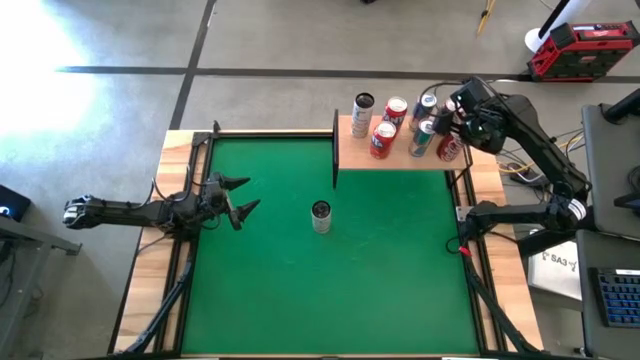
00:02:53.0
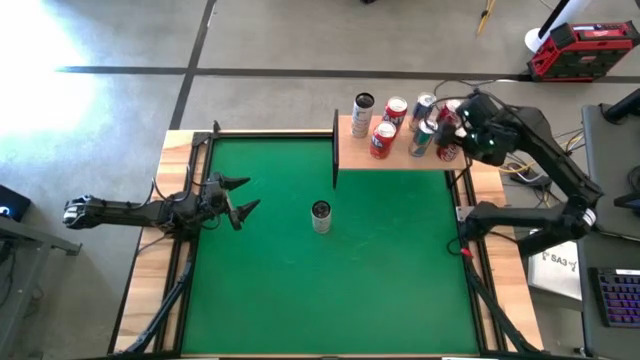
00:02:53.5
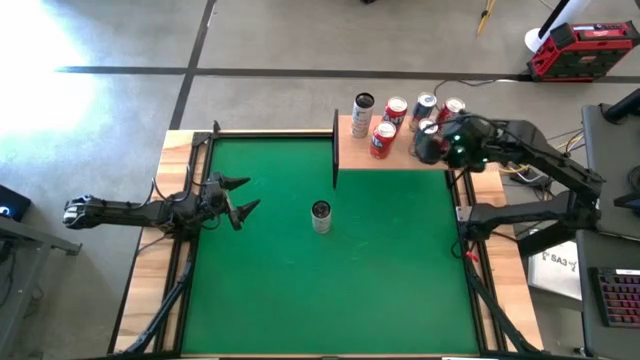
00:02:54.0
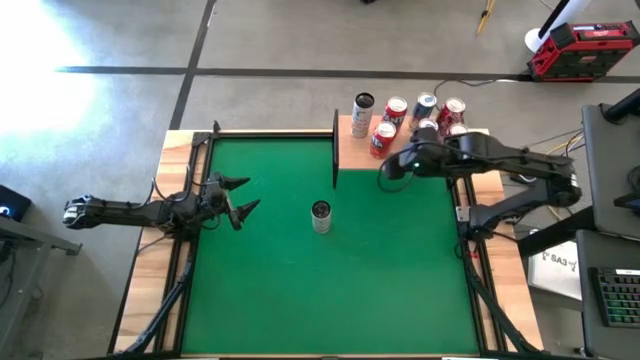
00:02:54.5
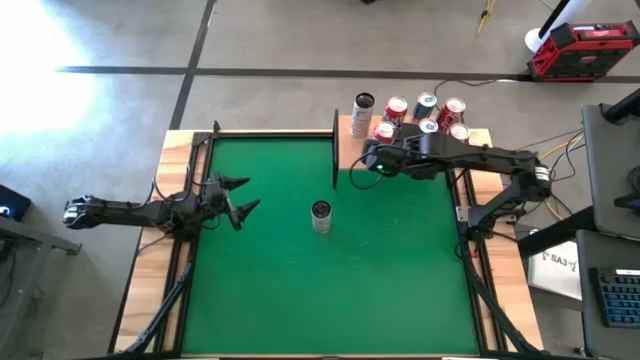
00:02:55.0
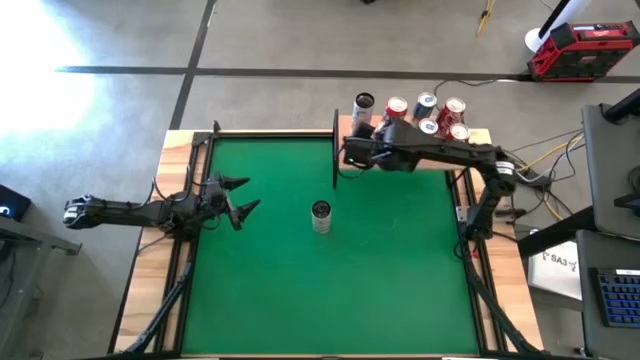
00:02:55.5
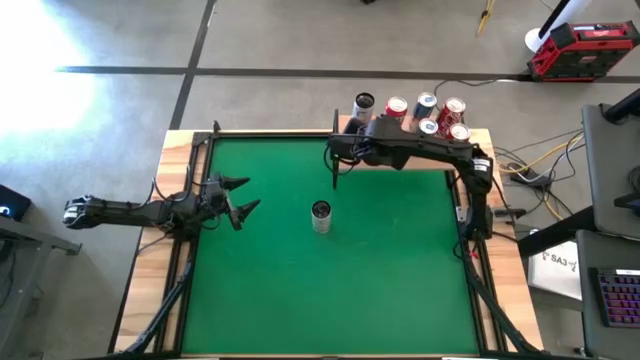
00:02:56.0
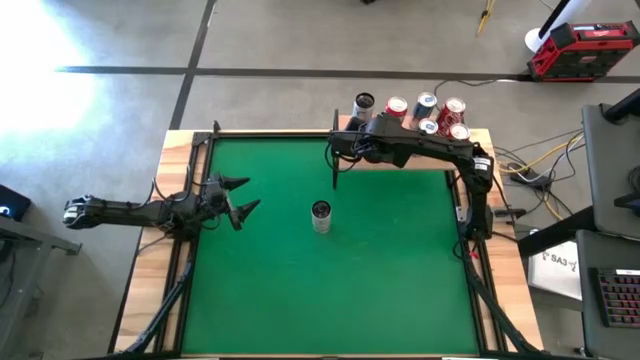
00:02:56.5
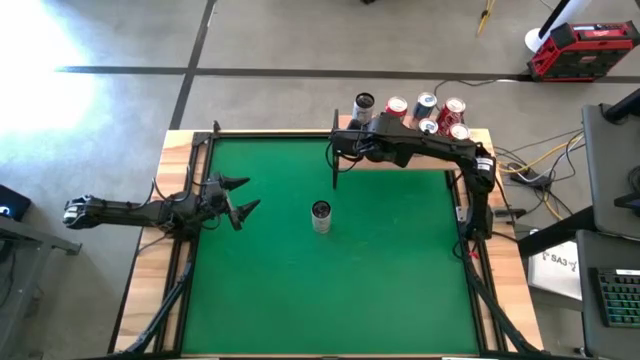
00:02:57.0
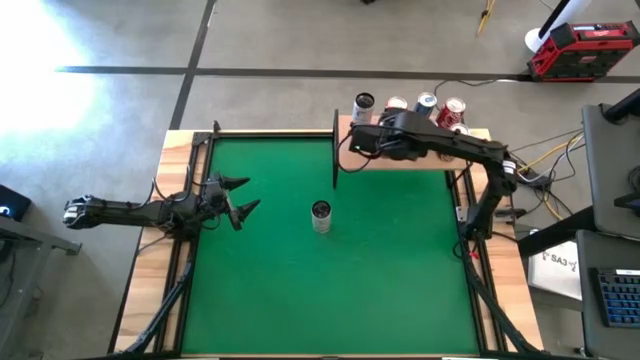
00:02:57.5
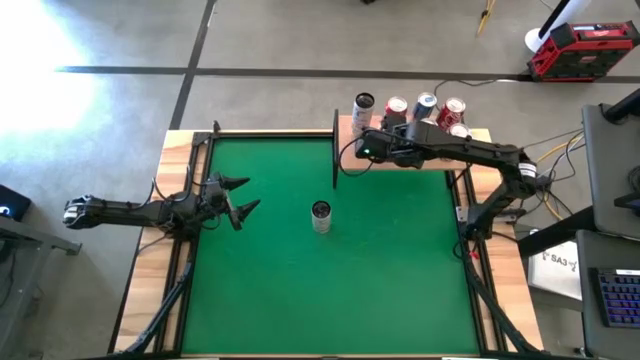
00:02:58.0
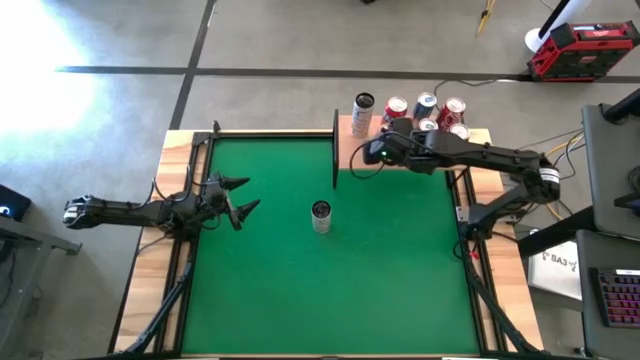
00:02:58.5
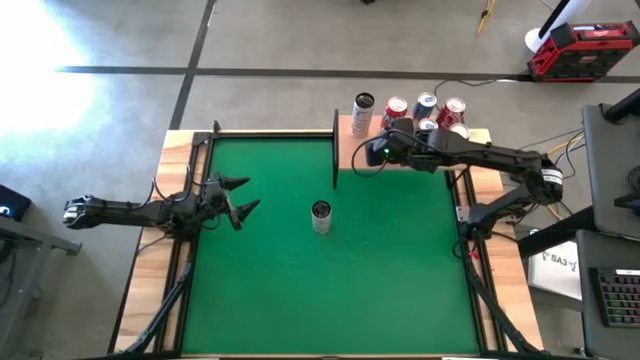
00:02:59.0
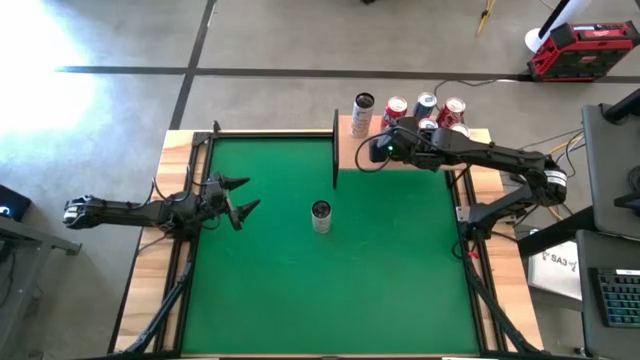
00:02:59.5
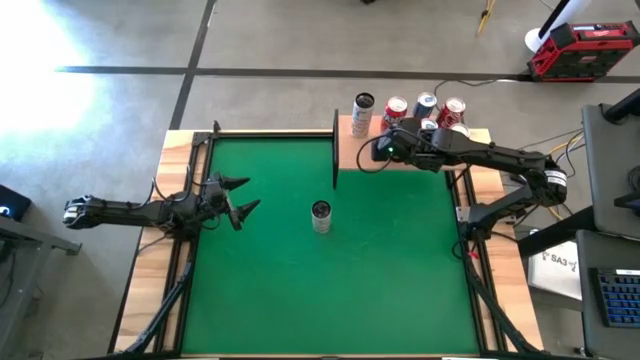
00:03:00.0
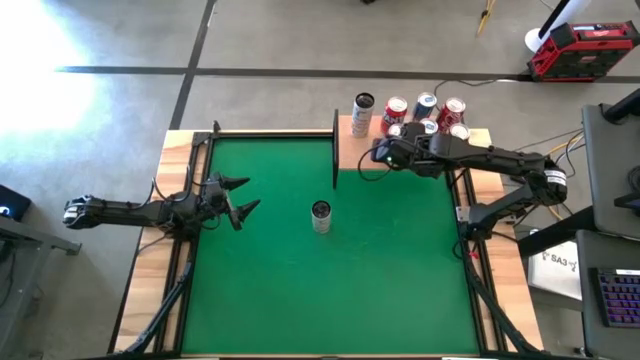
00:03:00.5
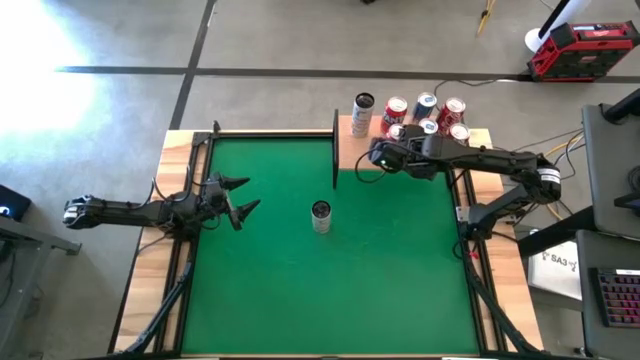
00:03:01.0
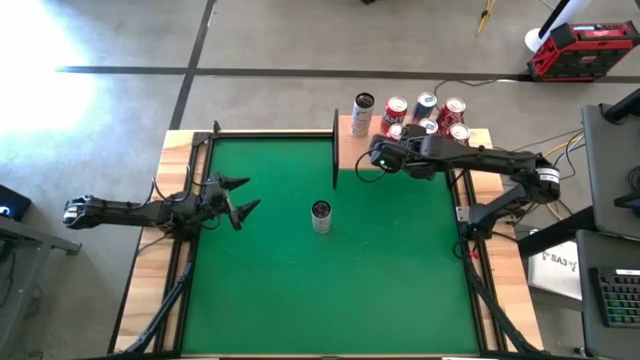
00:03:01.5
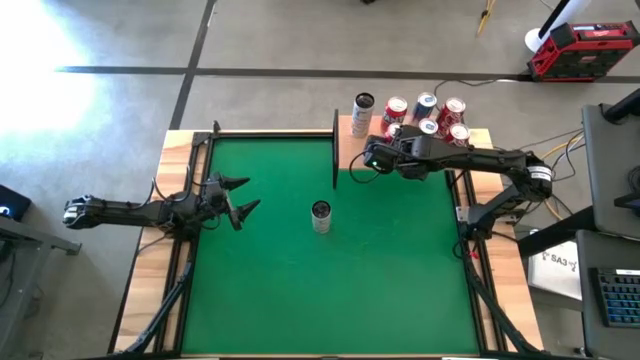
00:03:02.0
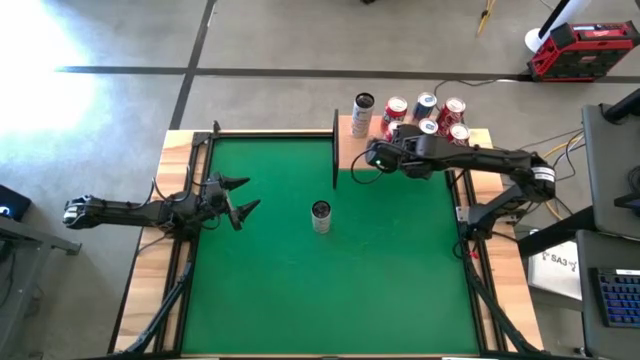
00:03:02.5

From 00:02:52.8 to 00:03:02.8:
Task: Place canned beverage on shelf
Adjust the red soda can on the shelf

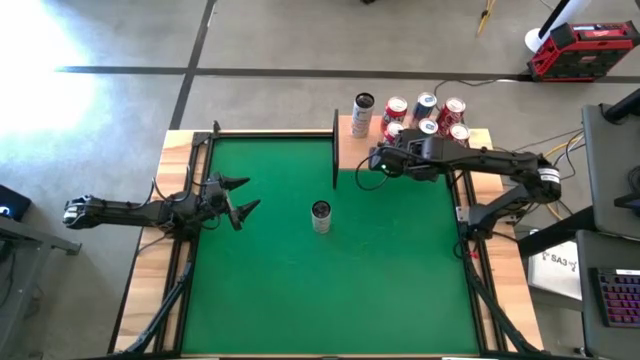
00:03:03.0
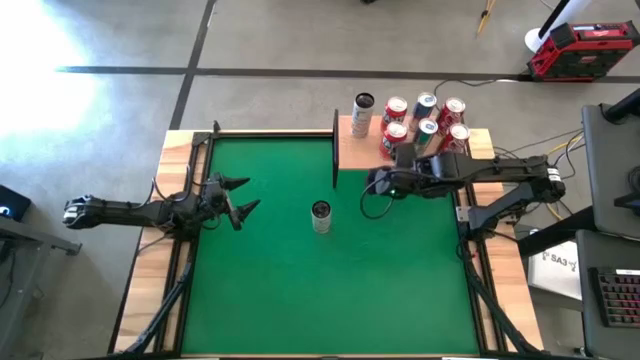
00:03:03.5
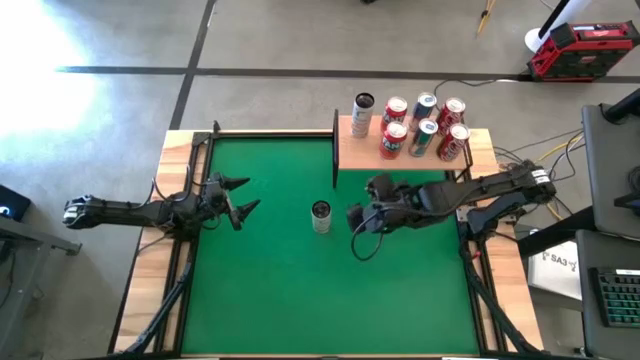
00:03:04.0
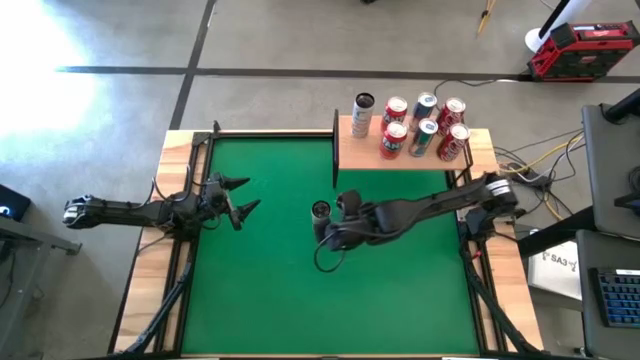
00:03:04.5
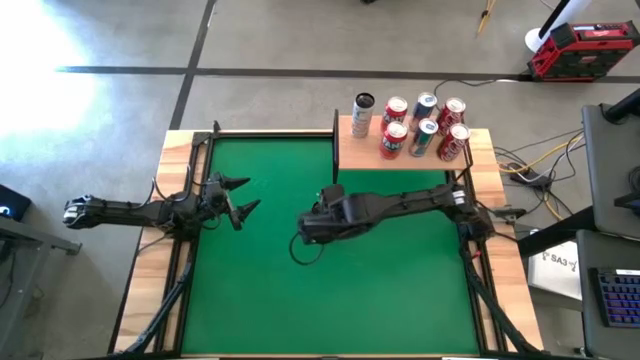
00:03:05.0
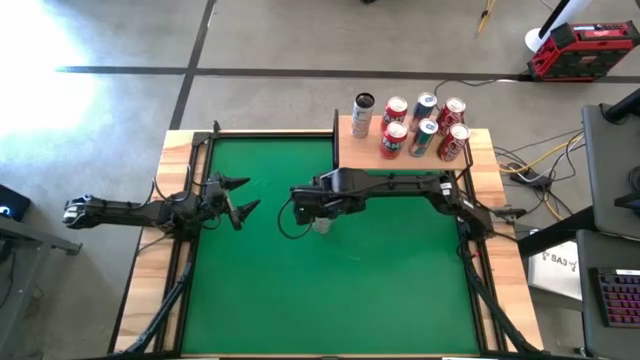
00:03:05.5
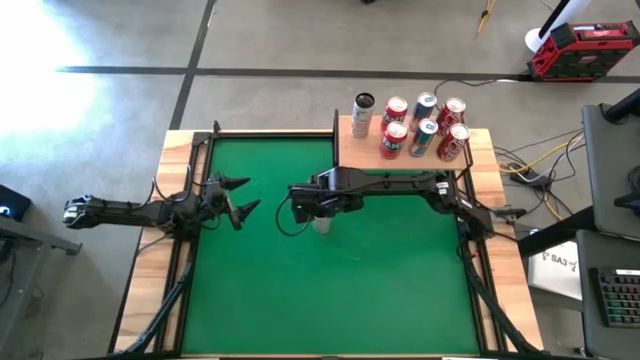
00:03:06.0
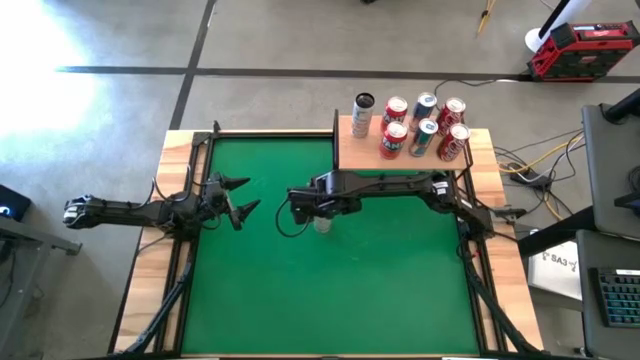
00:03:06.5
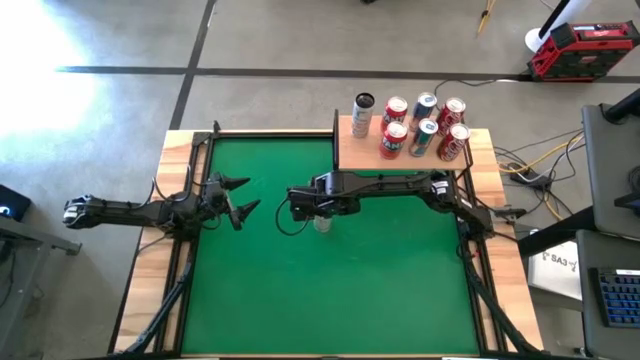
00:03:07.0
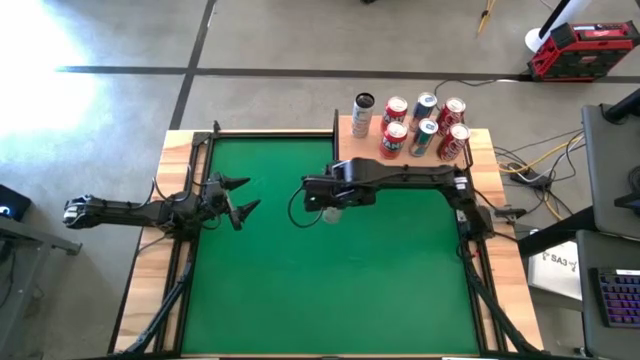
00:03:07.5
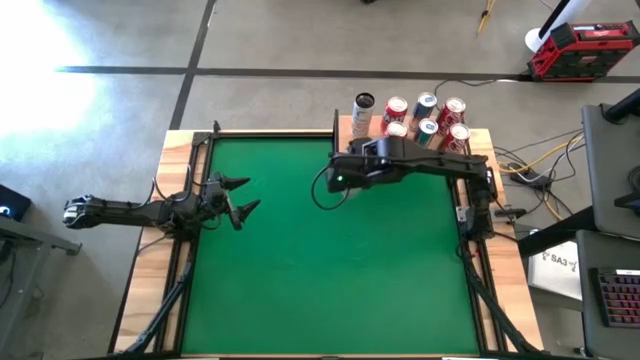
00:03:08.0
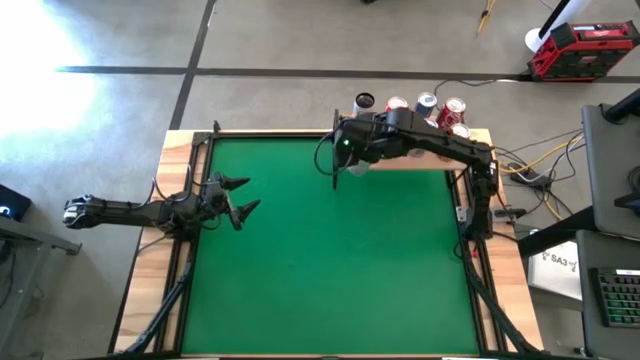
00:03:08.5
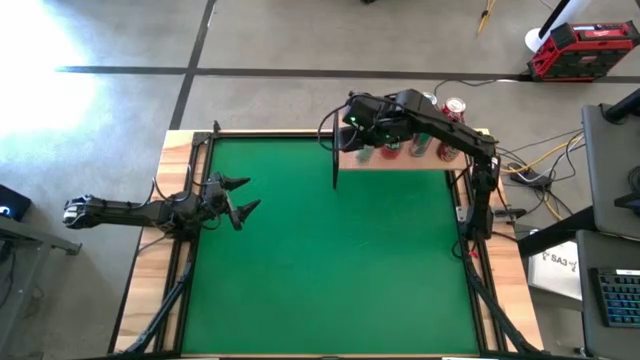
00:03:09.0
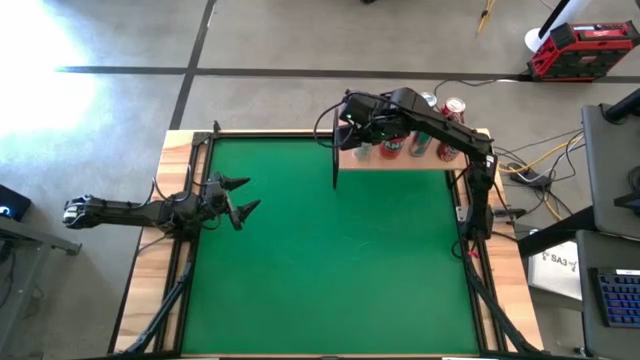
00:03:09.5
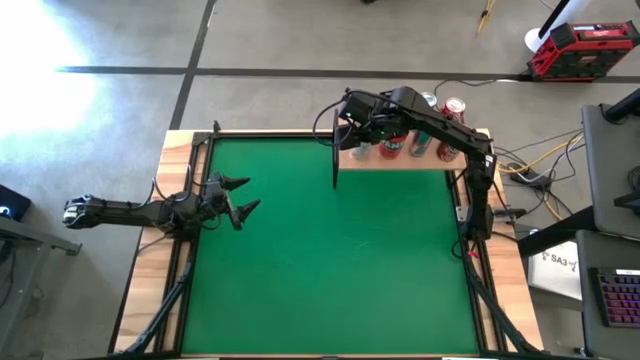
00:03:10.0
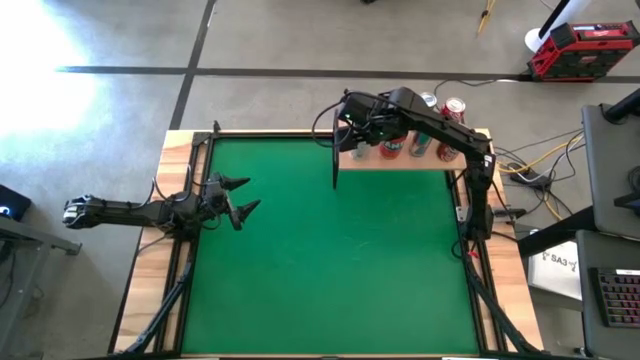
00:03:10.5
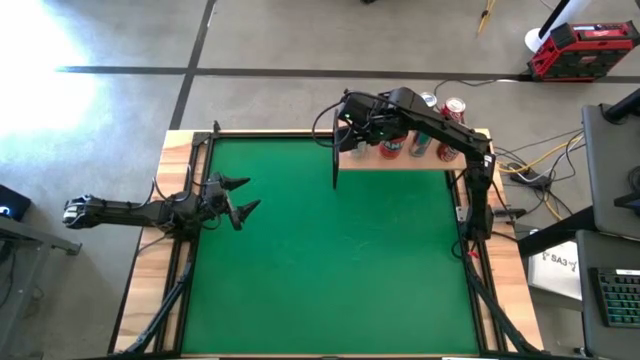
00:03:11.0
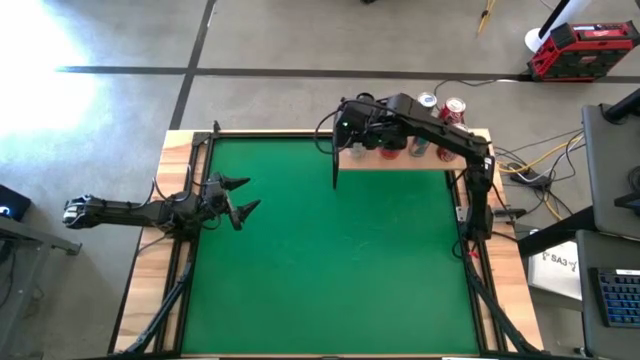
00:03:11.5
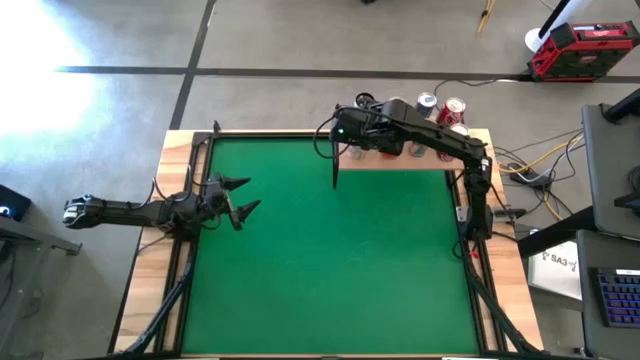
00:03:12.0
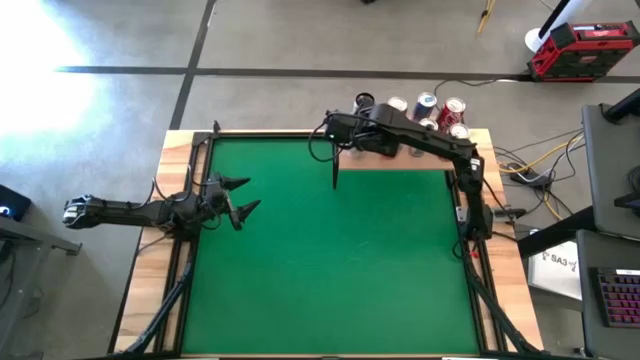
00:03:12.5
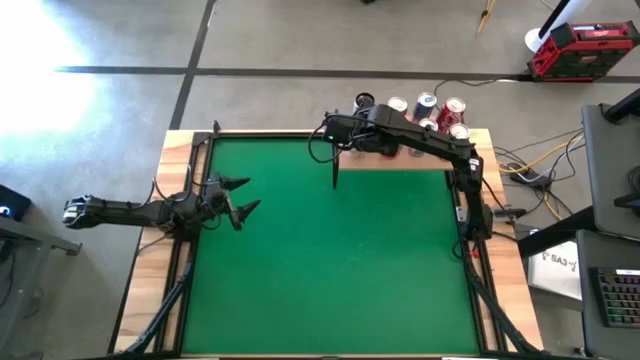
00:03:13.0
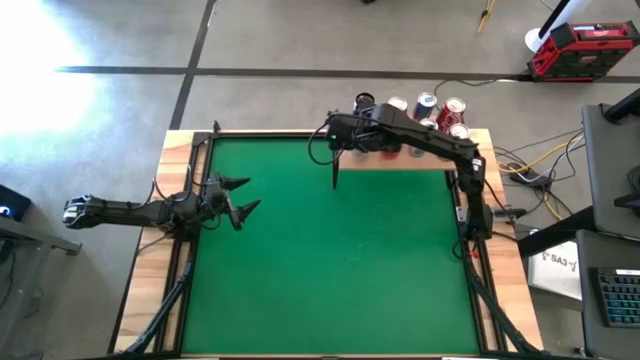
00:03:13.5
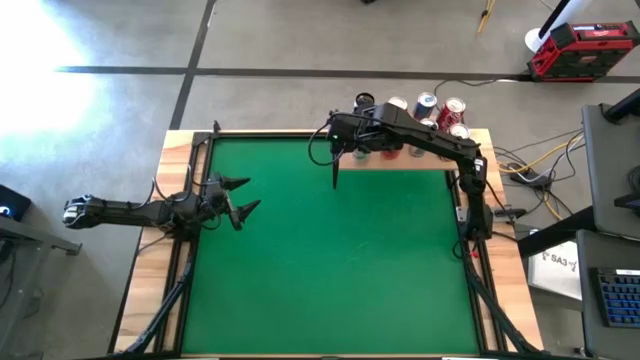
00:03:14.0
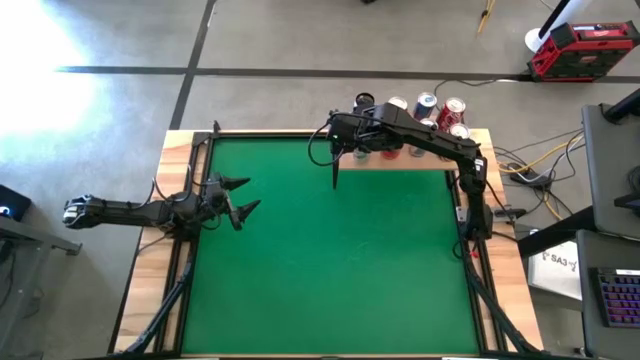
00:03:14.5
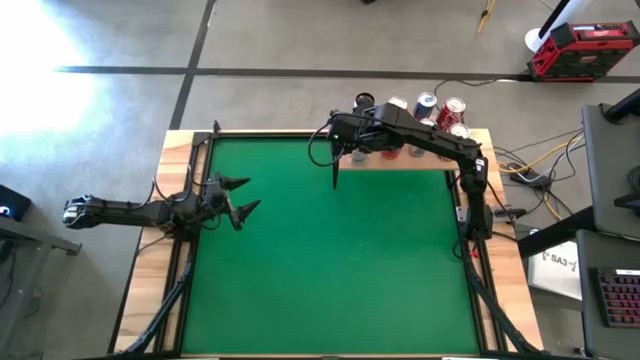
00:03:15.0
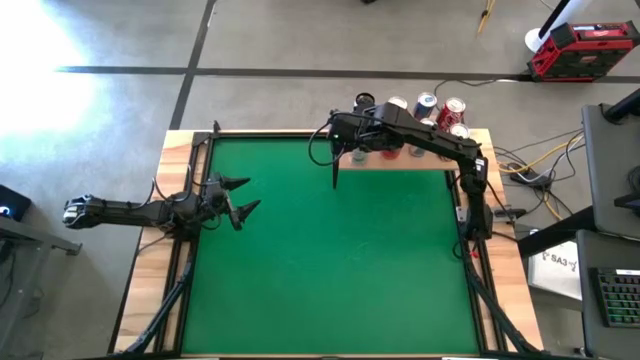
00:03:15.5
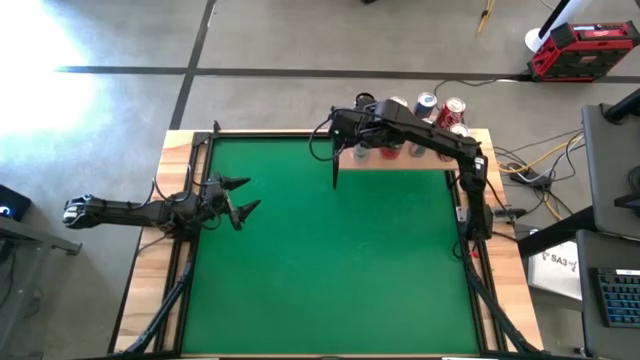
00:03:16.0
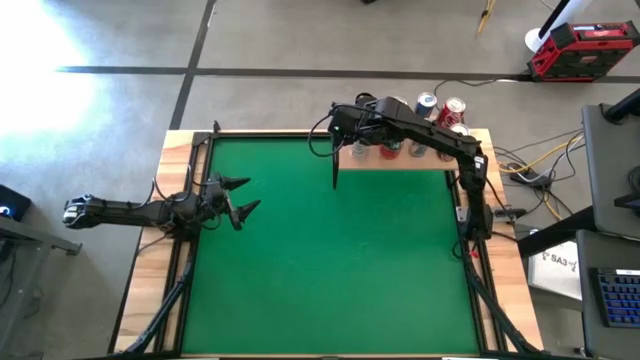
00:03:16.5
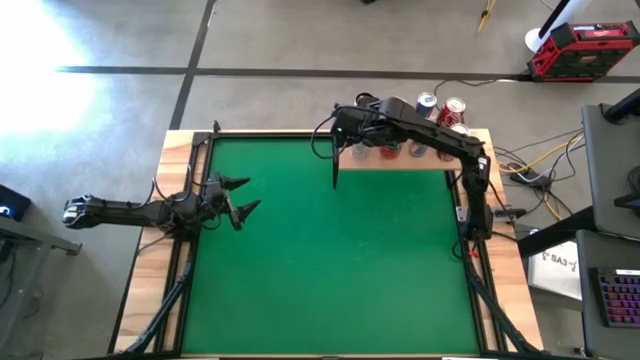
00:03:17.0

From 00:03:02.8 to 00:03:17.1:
Put the white-yellow soda can on the shelf and align it with the other white-yellow soda can
